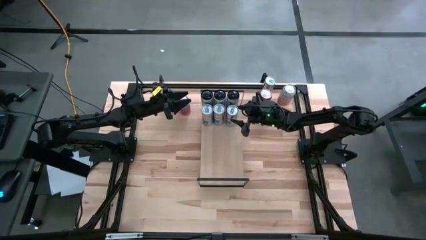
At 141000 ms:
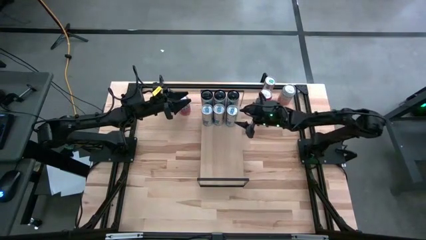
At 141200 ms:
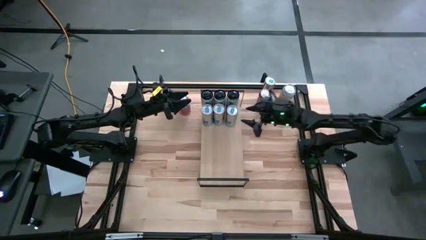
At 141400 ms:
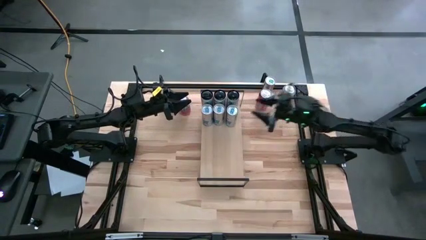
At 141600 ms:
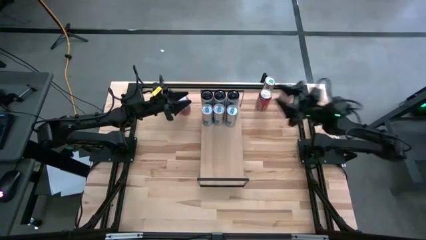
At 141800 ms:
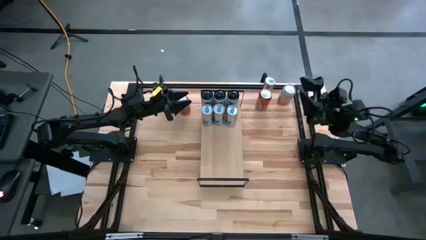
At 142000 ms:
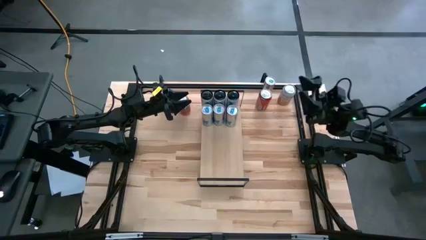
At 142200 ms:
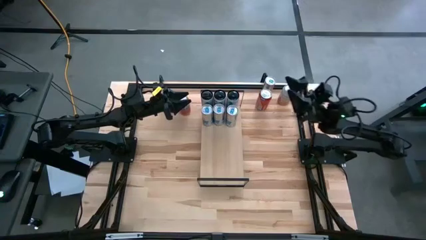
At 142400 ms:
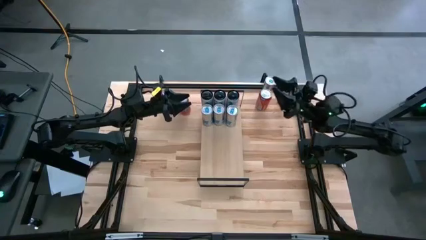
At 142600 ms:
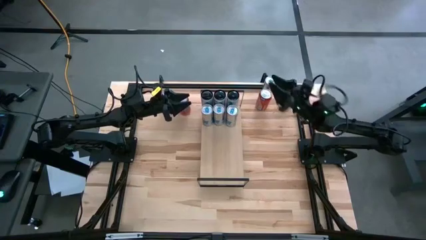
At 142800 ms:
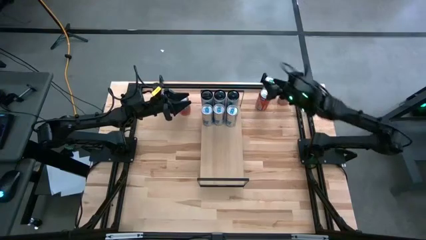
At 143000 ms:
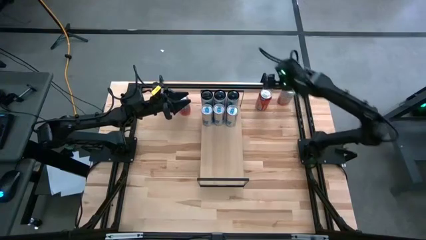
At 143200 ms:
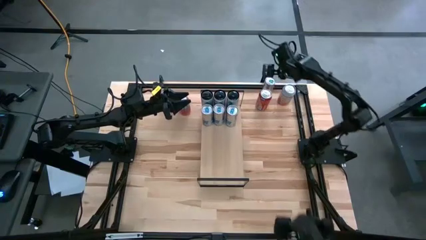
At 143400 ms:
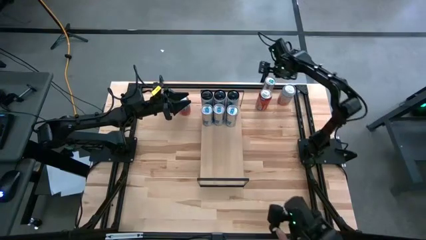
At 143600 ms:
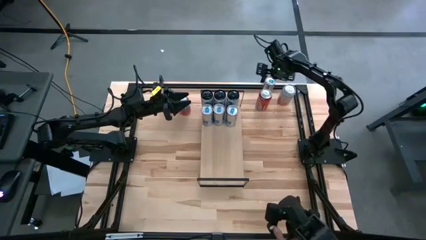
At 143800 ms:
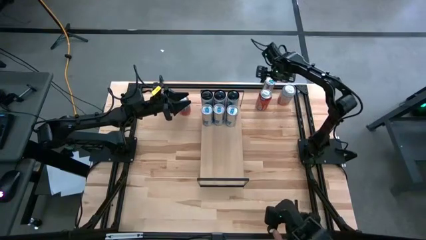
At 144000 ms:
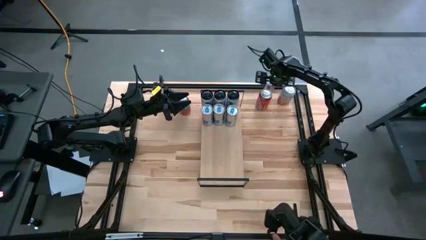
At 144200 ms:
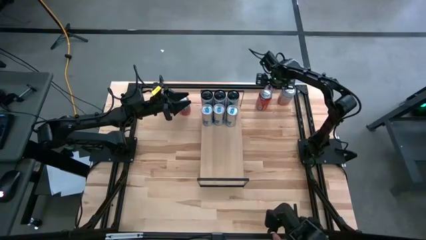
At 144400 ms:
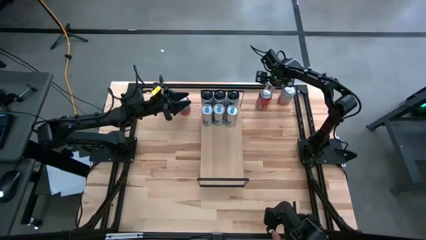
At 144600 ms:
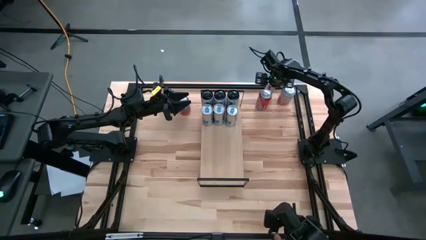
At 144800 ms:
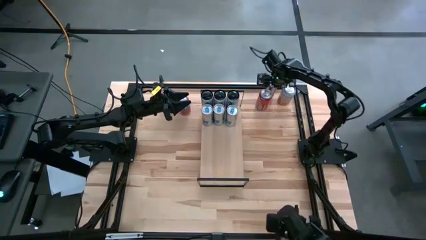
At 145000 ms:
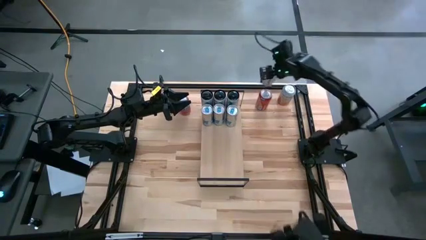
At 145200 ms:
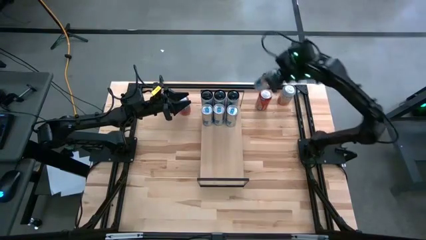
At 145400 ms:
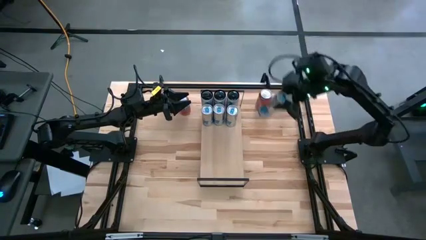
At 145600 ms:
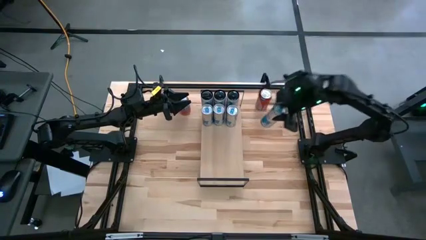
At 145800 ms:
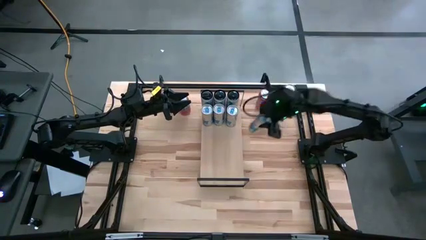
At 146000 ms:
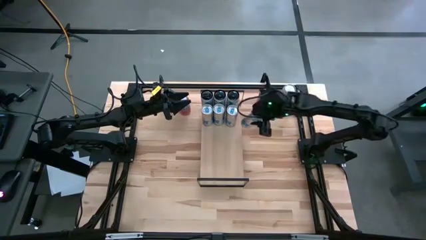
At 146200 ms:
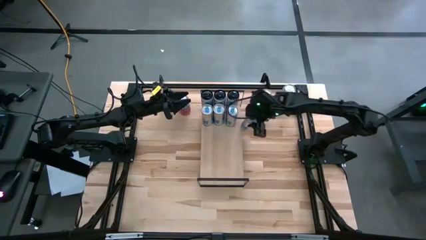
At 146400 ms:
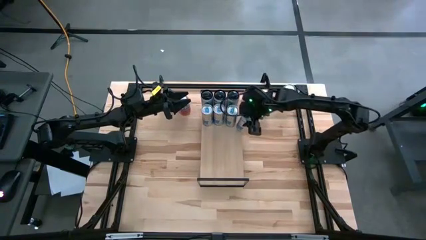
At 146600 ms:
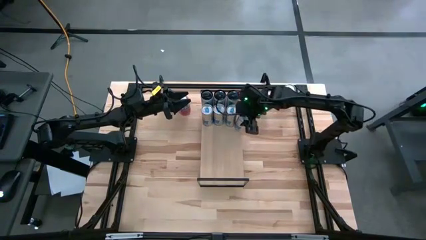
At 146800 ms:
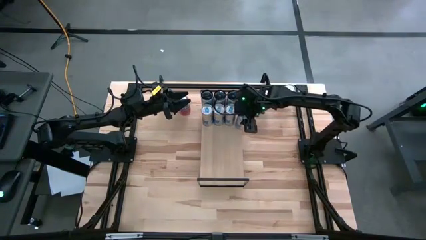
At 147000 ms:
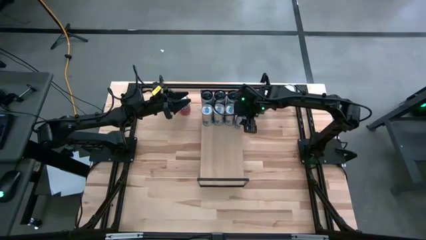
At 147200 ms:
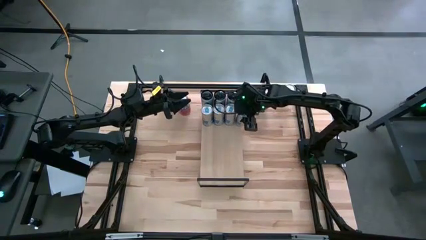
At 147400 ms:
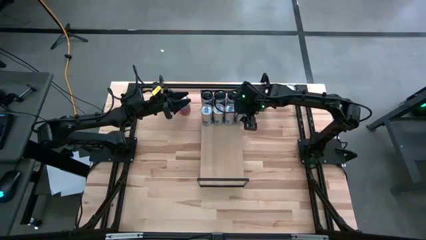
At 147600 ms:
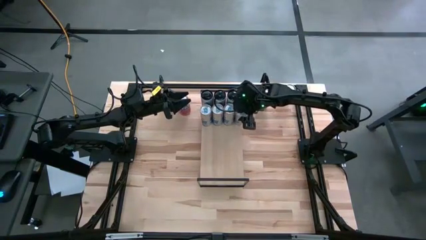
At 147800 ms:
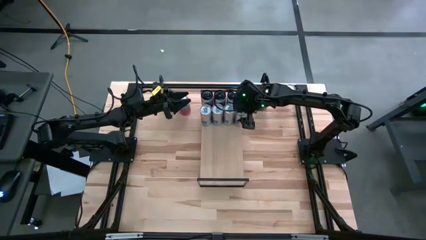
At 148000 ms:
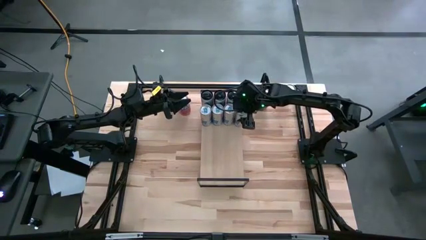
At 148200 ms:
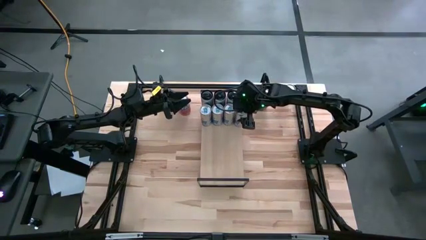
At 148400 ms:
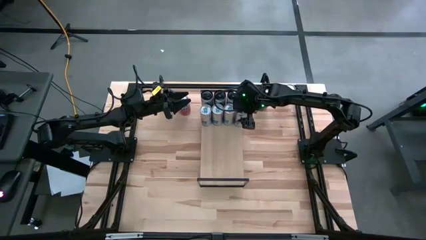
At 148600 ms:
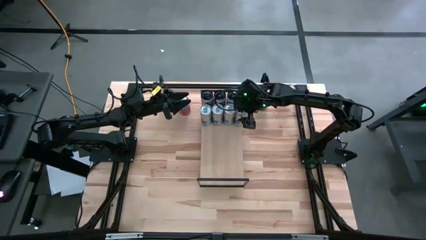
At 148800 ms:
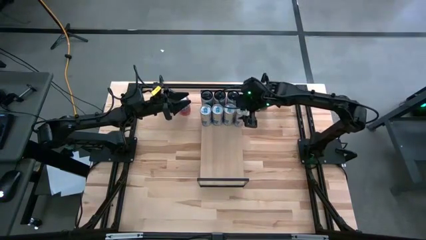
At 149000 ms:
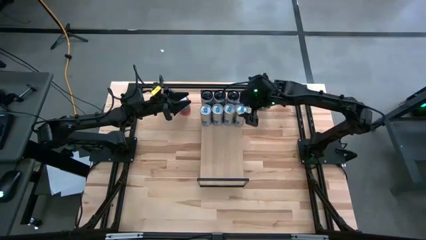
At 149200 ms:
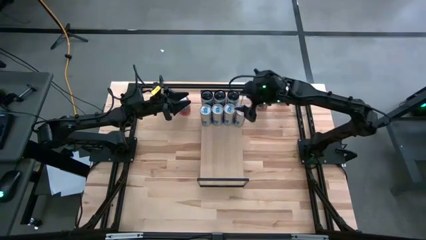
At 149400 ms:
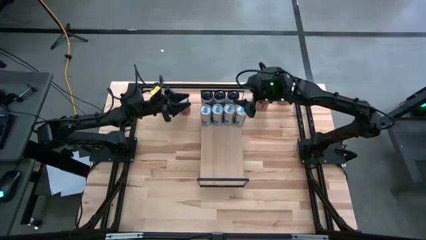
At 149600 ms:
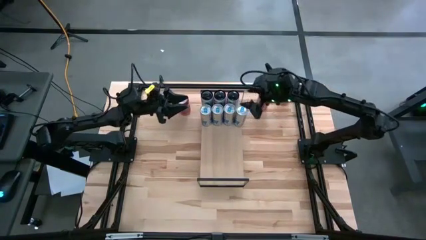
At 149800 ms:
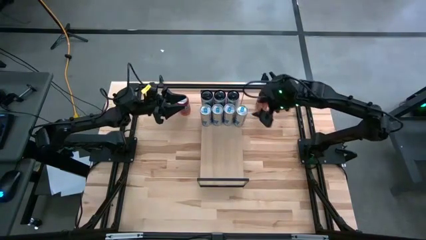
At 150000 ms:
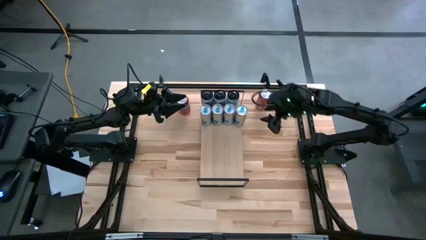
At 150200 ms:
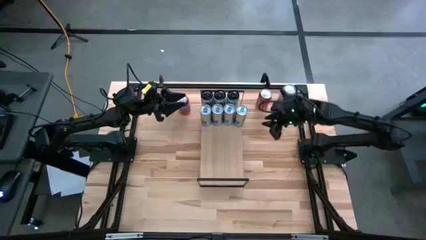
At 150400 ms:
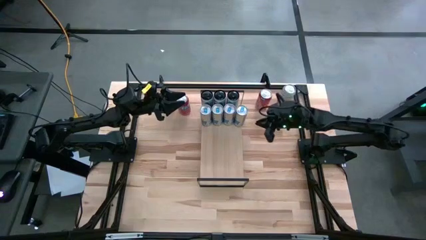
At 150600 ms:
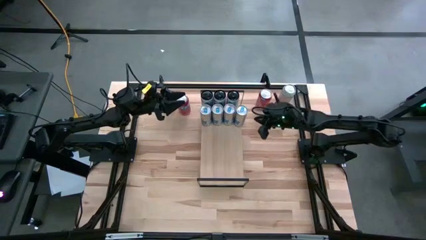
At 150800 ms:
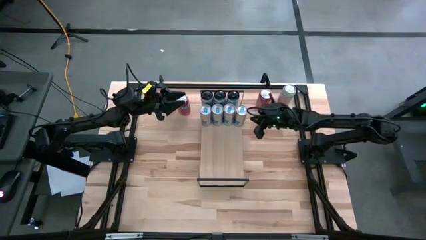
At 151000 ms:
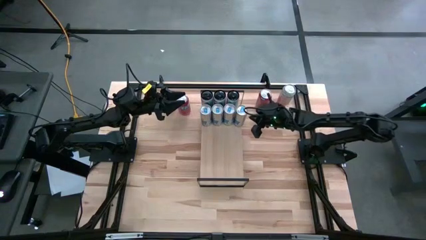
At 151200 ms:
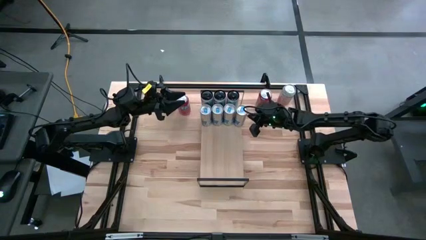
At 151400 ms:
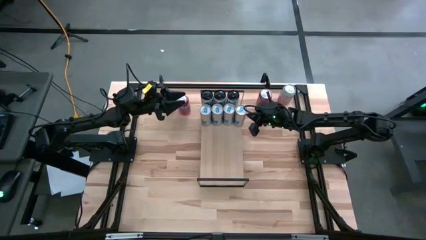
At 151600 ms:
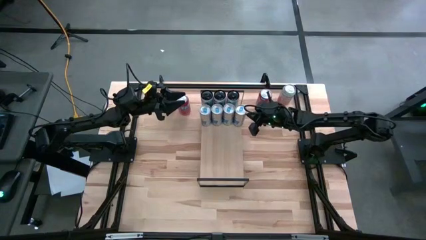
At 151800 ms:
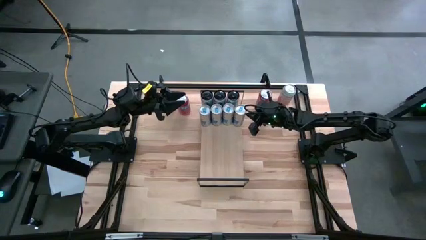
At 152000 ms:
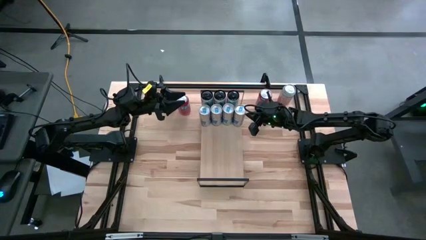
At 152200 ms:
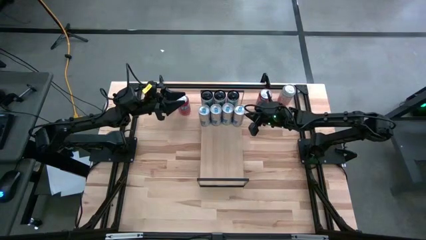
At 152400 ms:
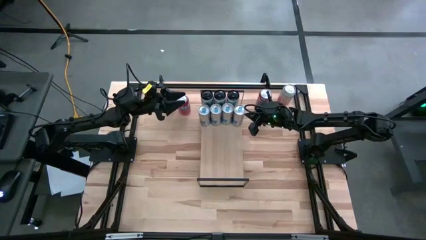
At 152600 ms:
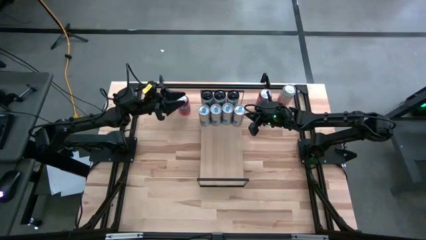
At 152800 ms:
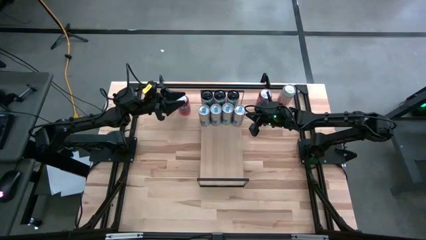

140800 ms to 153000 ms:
Task: Place canned beverage on shelf
Put the blue soda can on the shelf aligned with the other blue soda can

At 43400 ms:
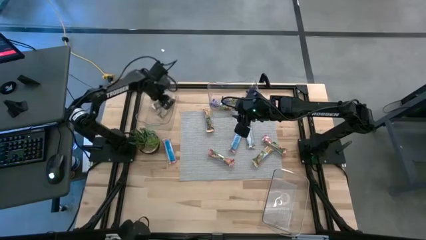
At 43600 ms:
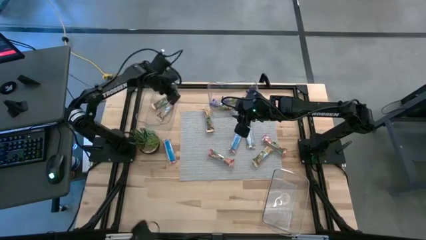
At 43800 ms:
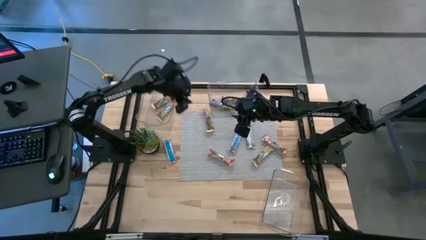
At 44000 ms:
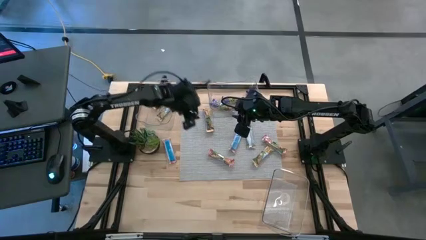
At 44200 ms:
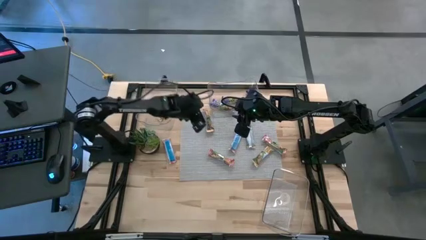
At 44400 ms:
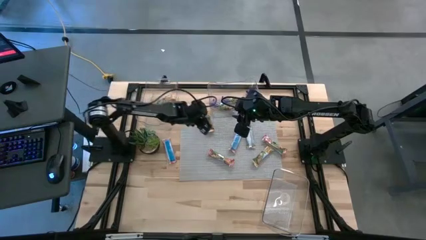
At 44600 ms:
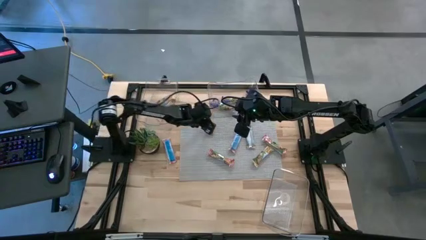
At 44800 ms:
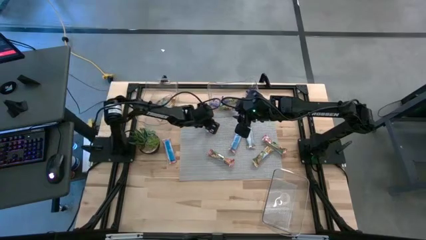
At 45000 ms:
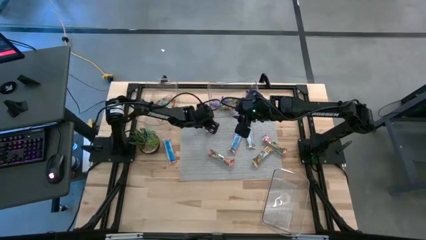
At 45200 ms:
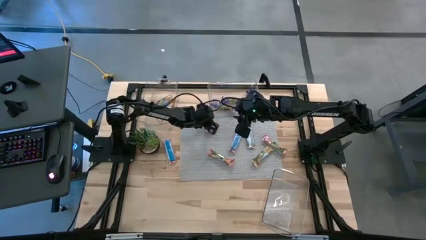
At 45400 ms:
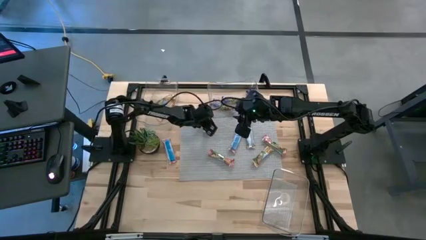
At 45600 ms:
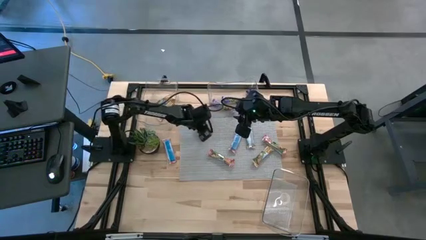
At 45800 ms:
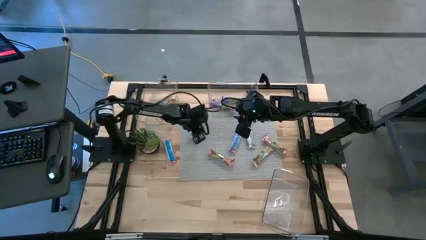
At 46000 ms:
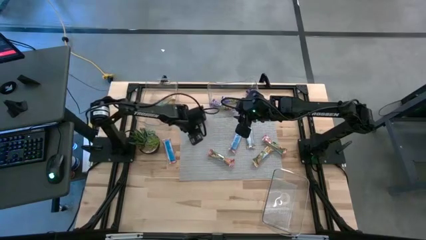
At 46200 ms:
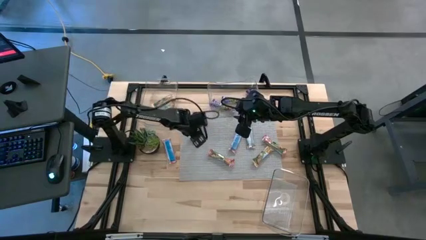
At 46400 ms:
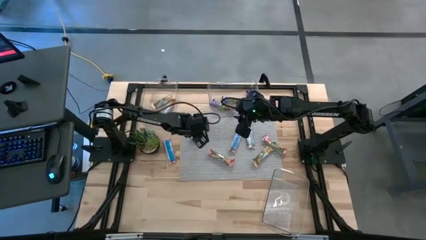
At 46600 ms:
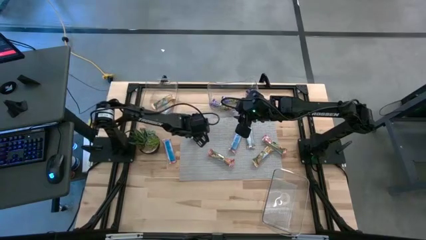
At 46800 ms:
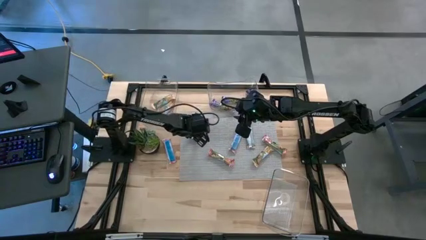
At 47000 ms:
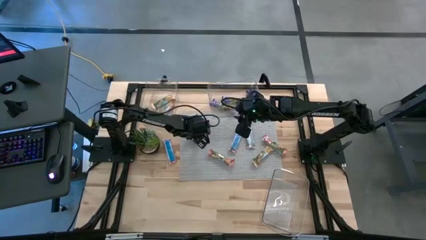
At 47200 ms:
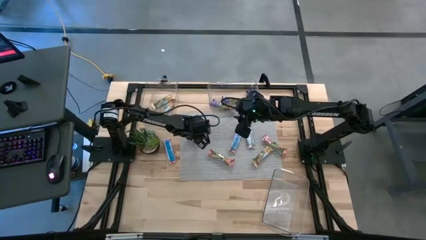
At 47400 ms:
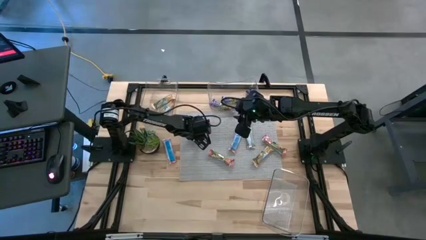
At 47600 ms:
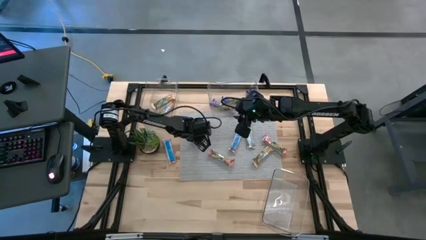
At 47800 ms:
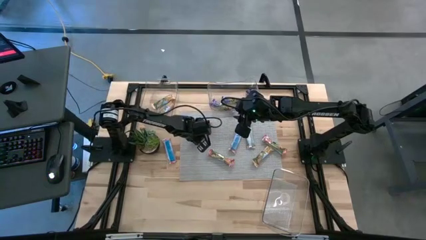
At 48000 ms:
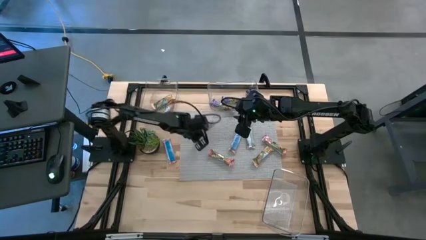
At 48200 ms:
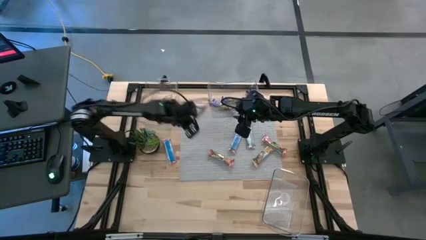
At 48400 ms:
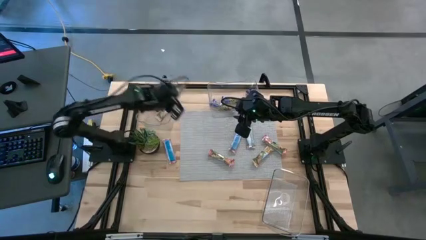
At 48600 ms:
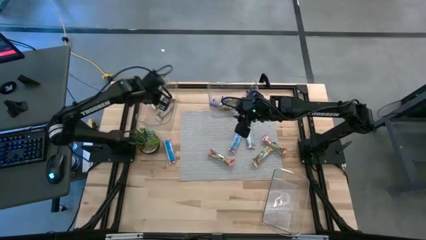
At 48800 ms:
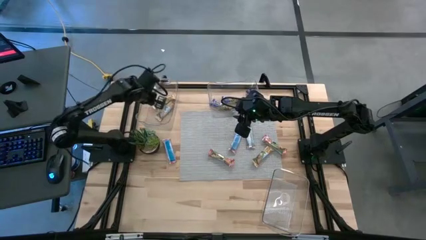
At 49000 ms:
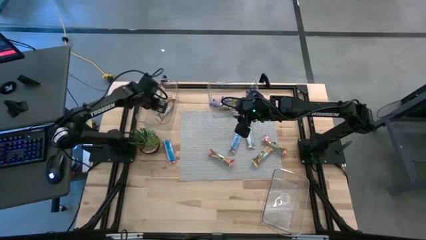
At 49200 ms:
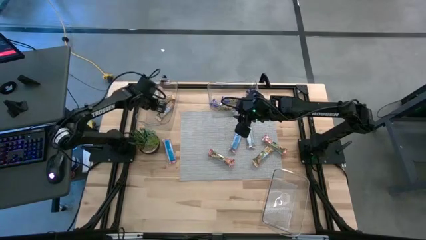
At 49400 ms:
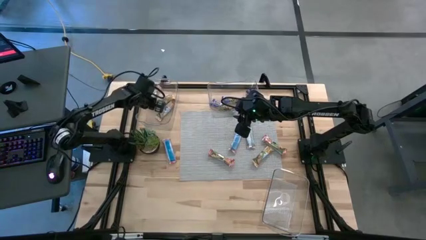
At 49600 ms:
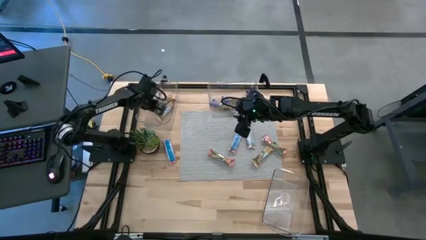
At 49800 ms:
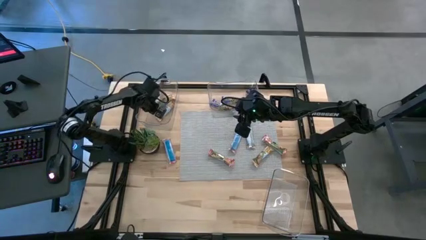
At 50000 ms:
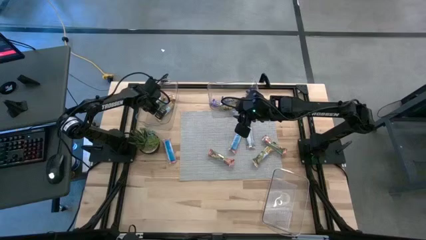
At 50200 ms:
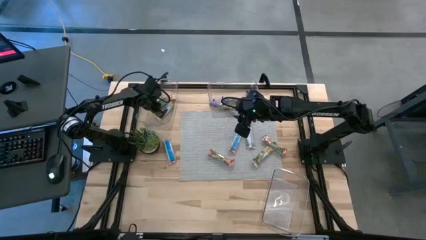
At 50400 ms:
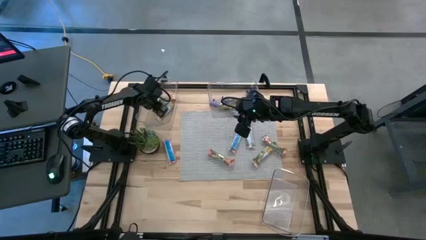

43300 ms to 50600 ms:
Task: Pick and place Granola Bars by type
Put the yellow granola bar into the left transparent bin
